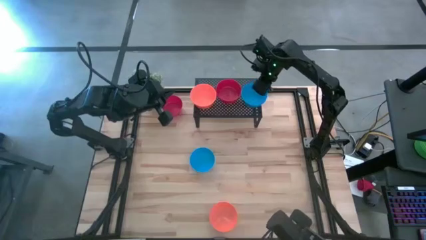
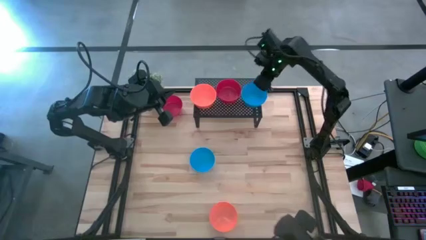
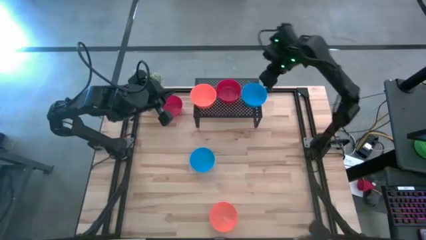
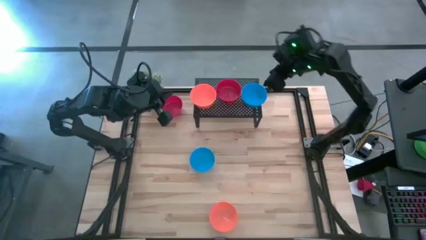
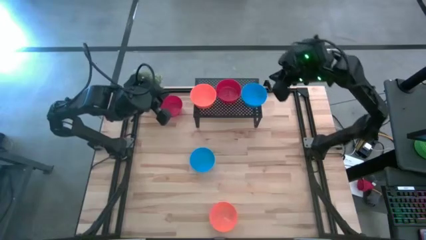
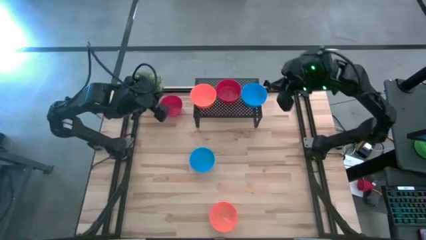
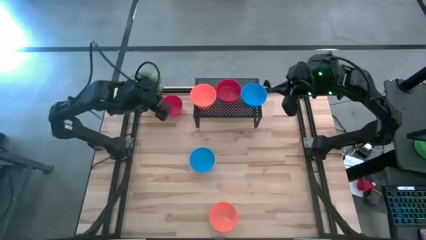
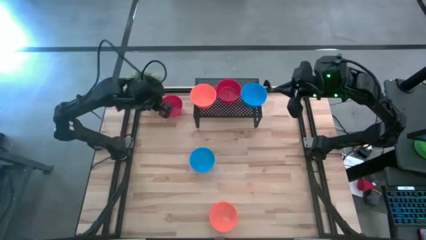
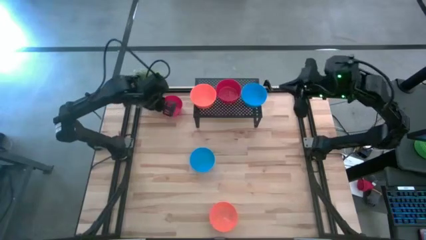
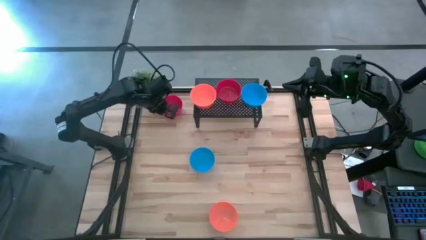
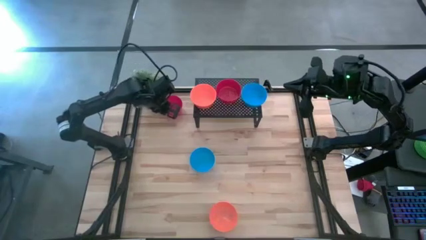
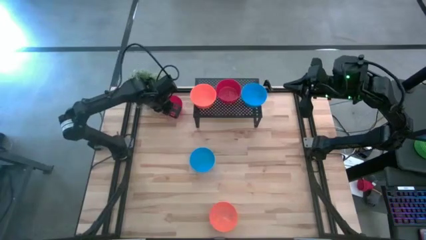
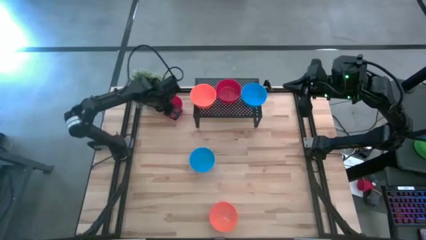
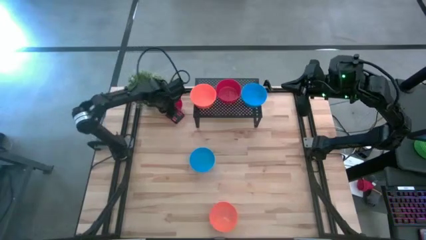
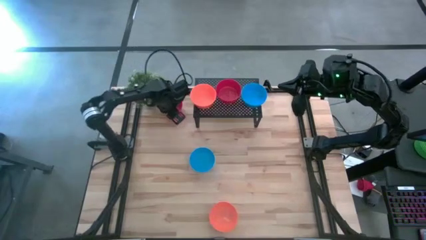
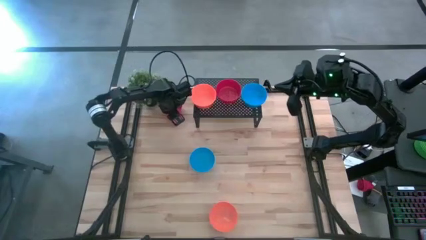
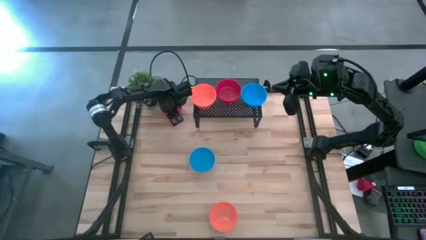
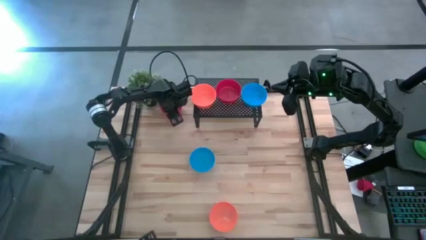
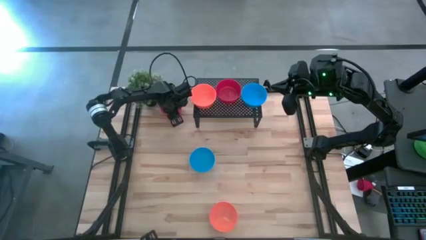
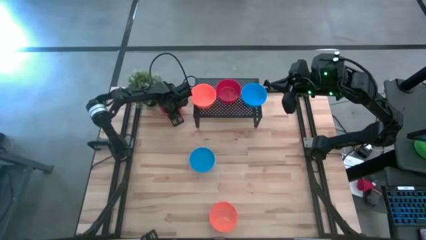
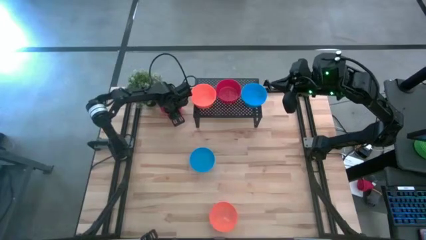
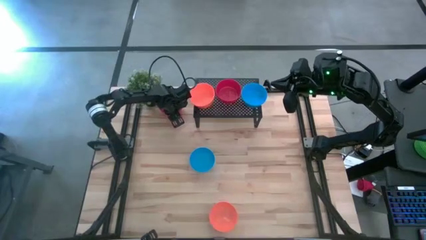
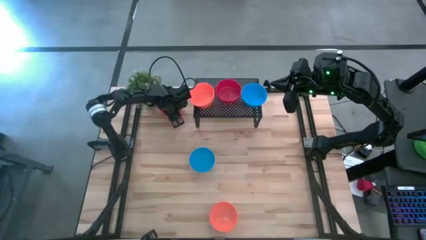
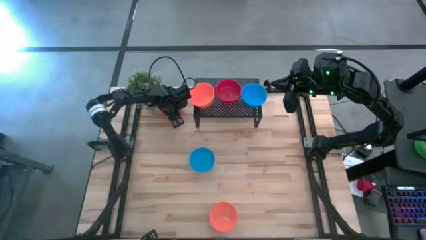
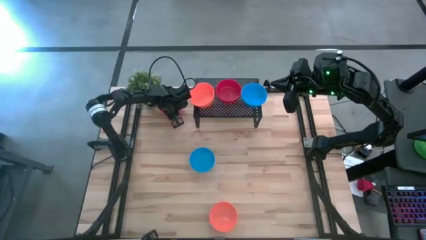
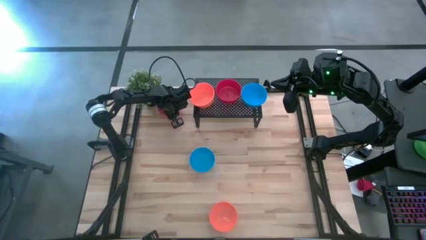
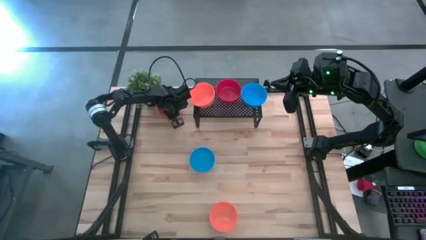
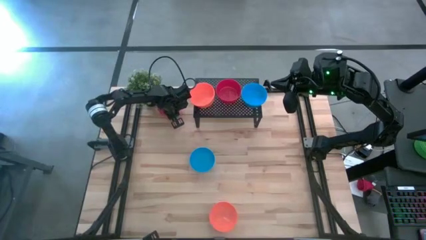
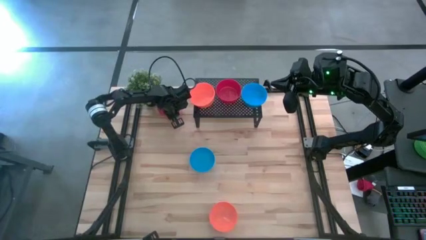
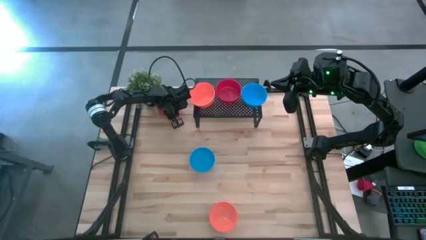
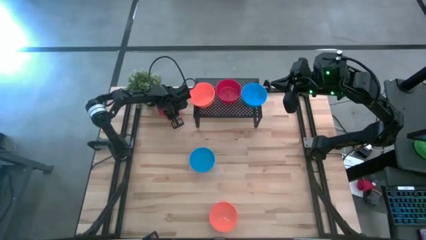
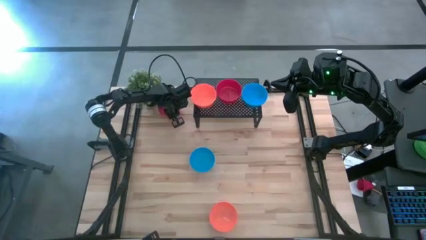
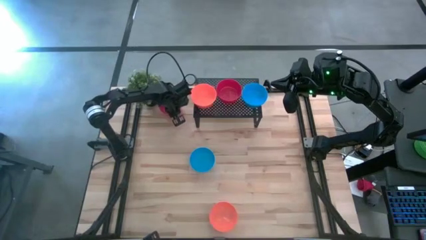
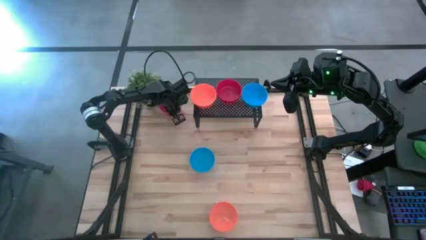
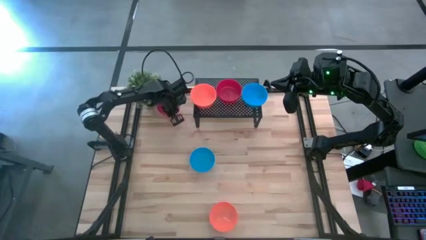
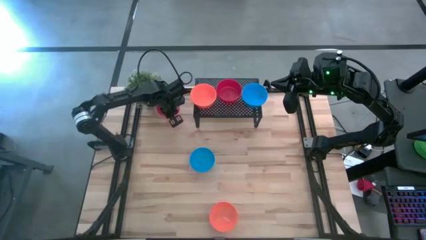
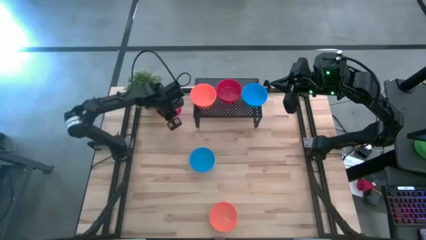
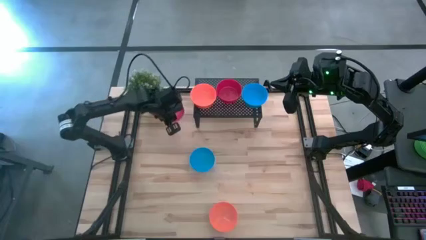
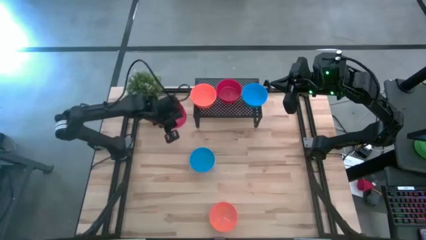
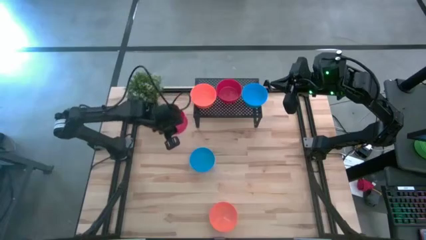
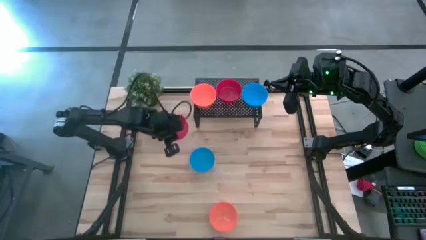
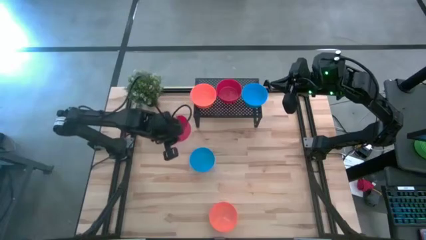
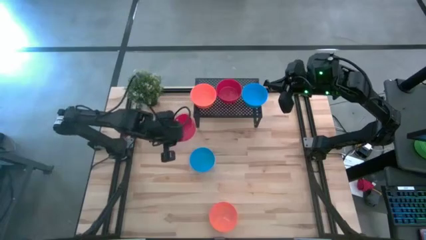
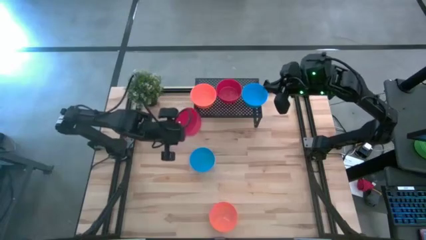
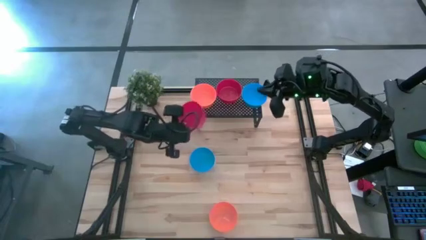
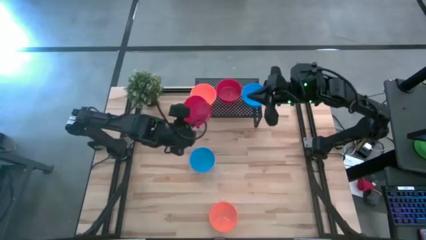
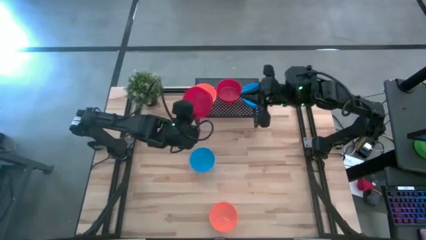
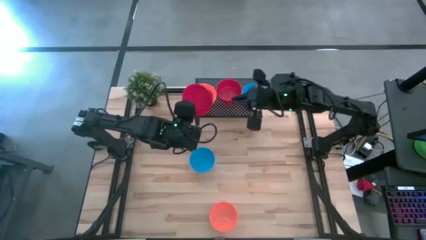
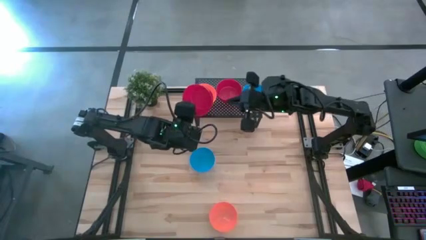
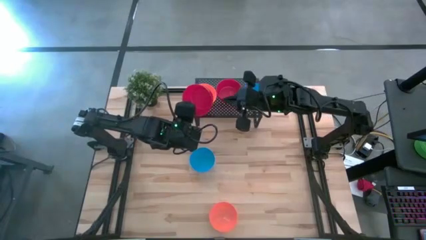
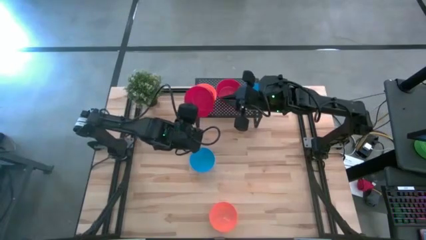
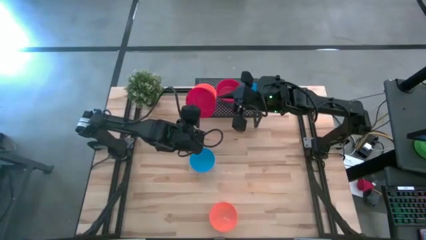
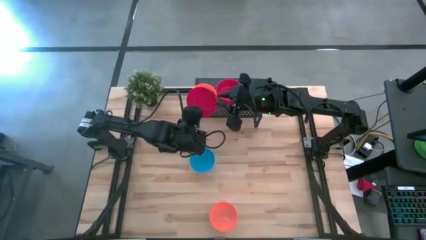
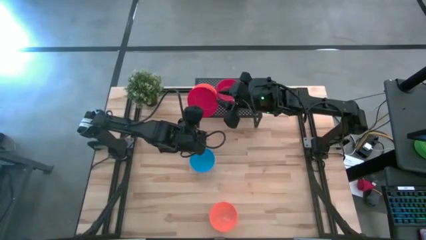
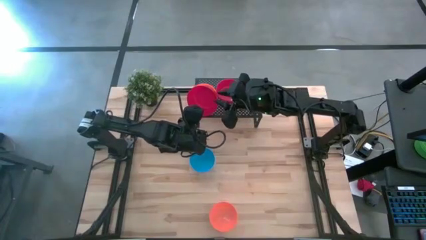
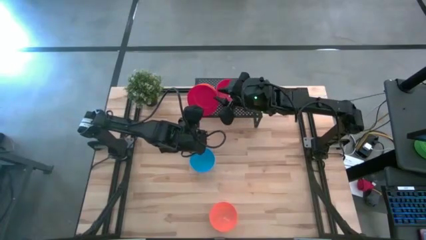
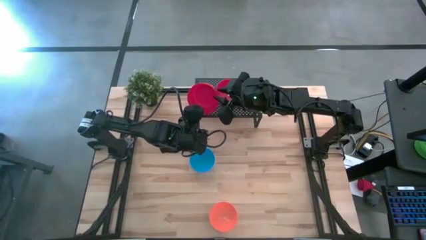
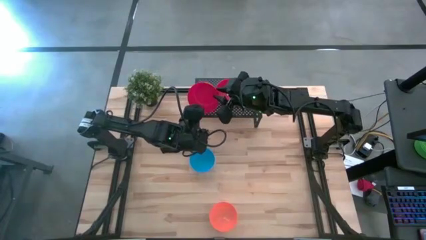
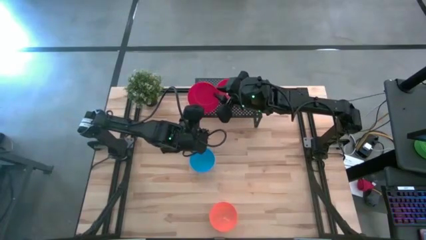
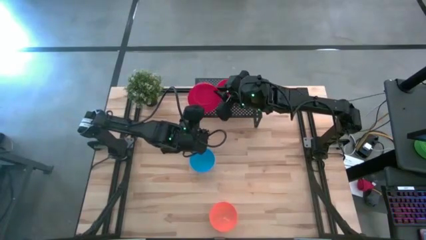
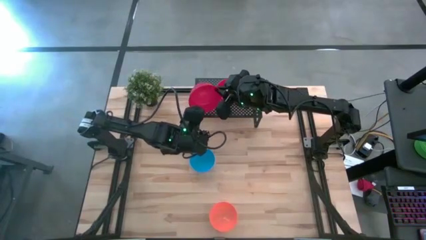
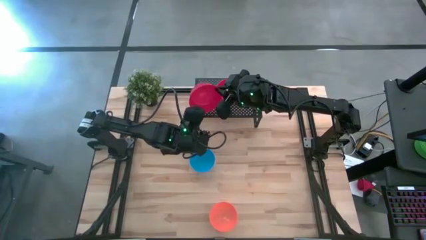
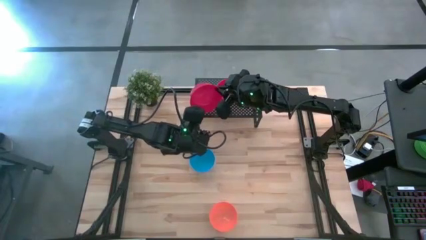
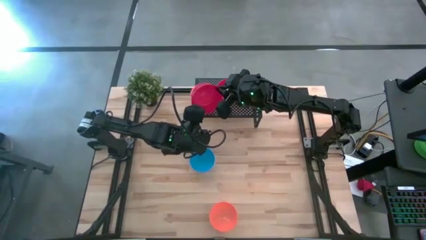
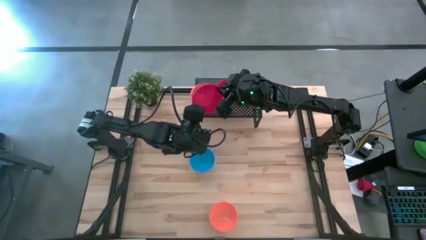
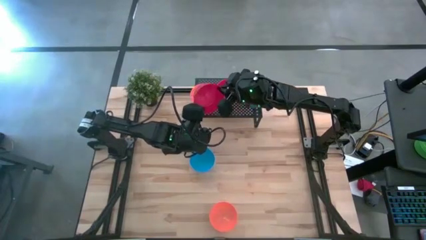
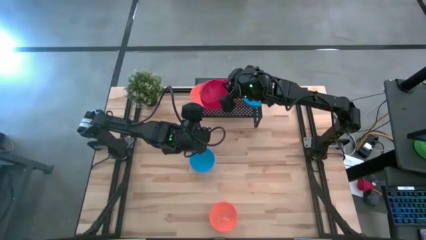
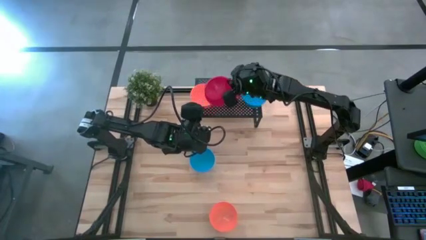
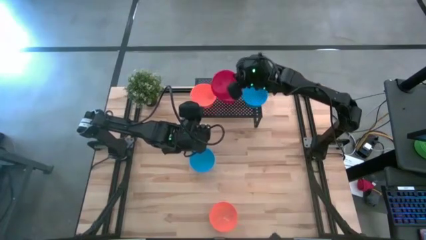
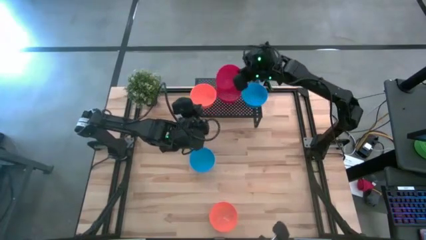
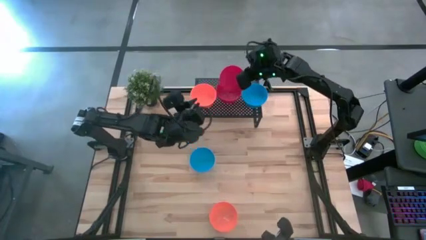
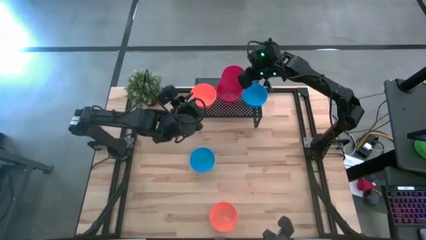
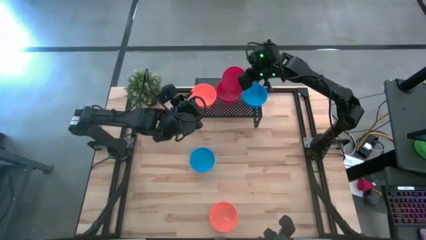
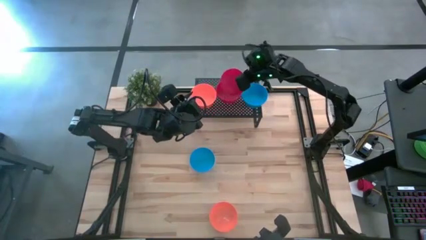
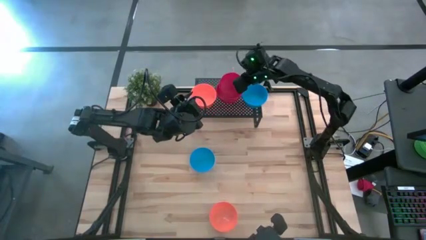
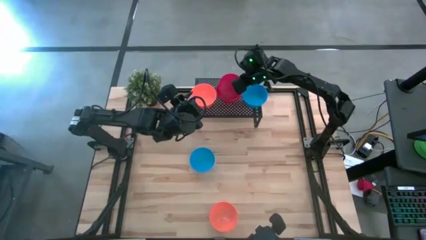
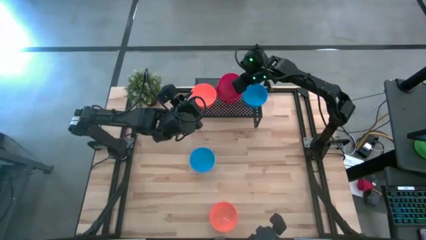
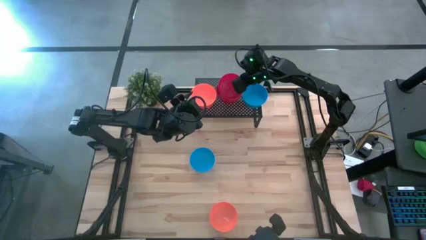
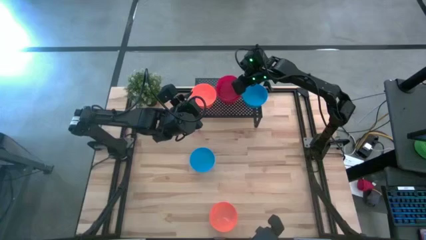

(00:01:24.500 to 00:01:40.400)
Task: Pick & Place Mini bowls
Stack the red bowl on top of the red bowl on the shelf
